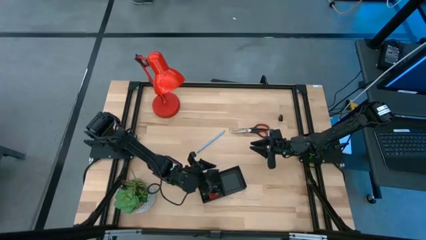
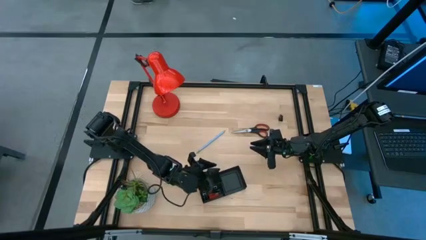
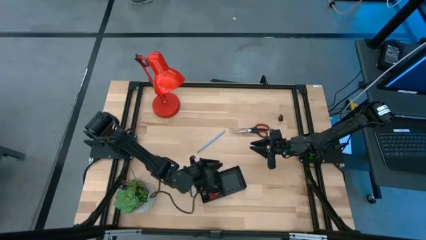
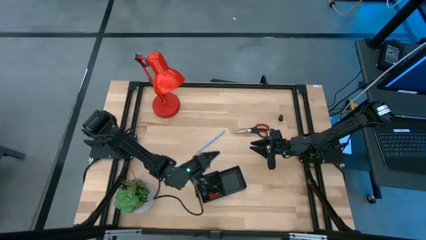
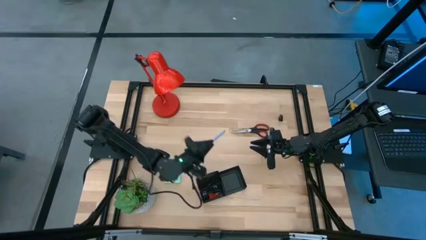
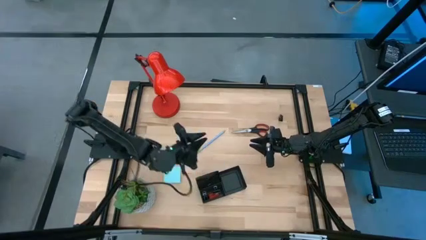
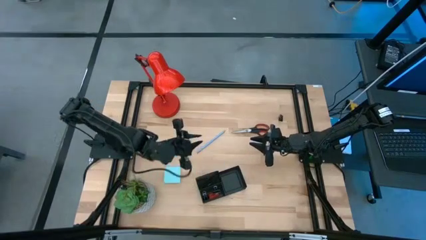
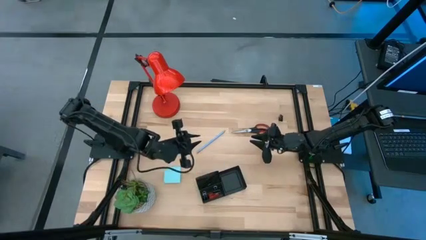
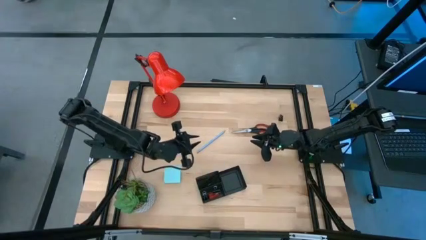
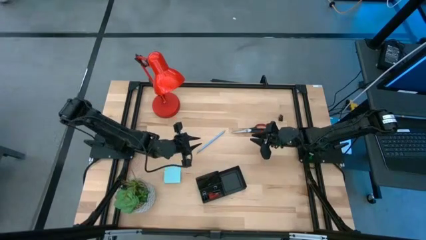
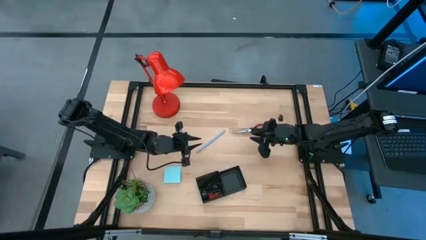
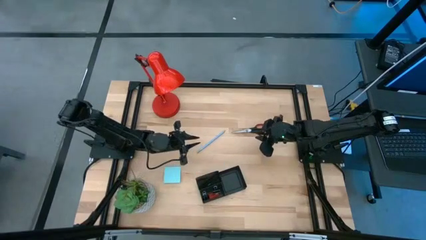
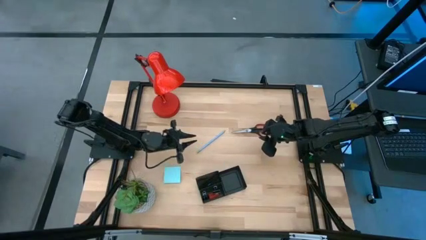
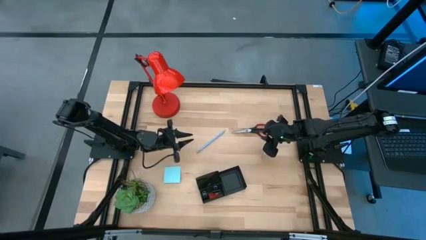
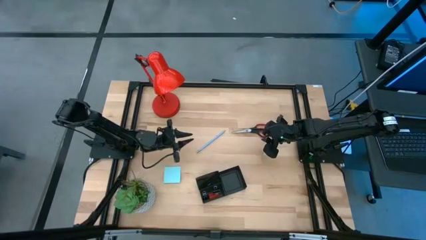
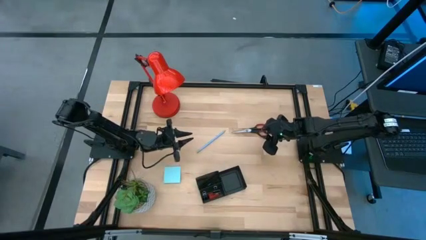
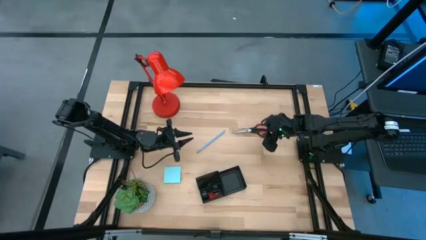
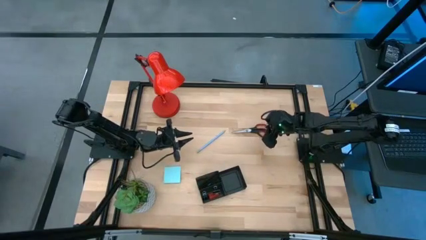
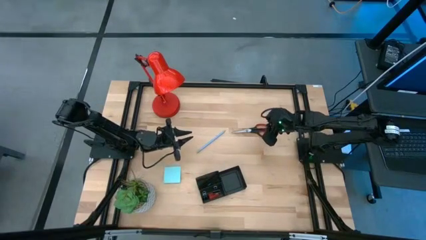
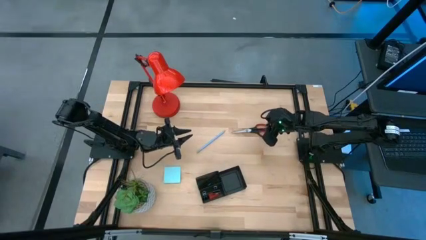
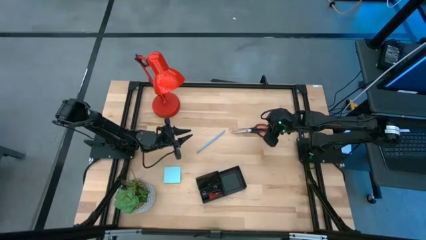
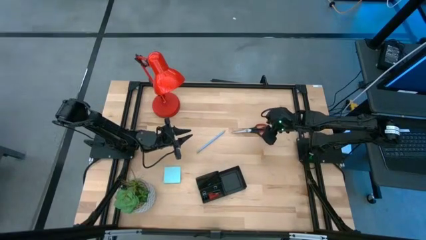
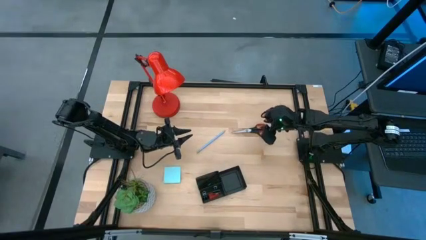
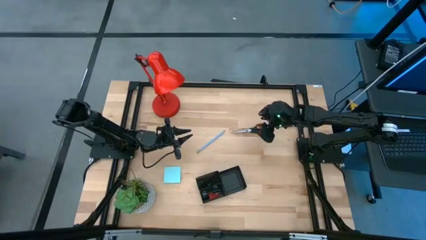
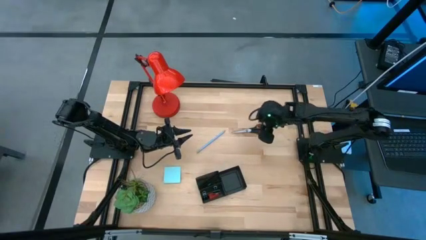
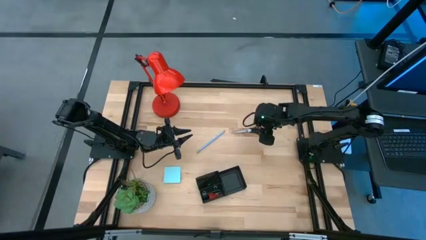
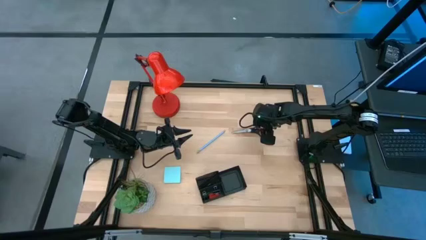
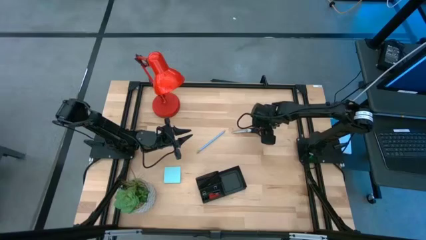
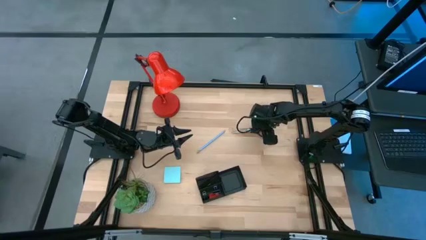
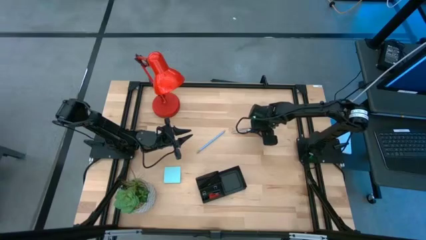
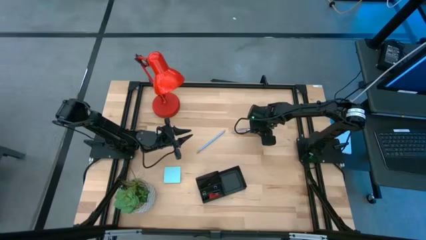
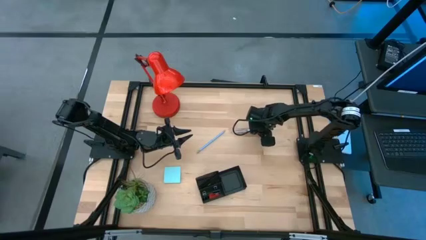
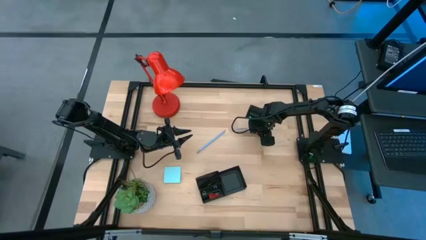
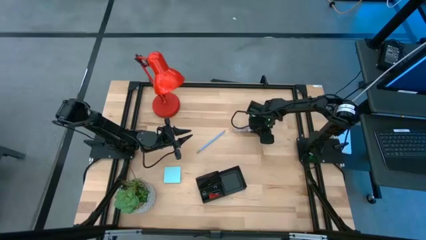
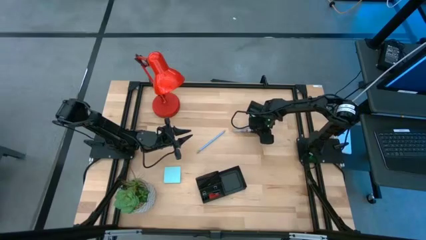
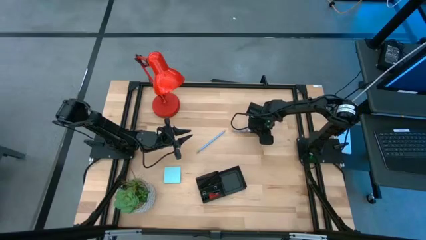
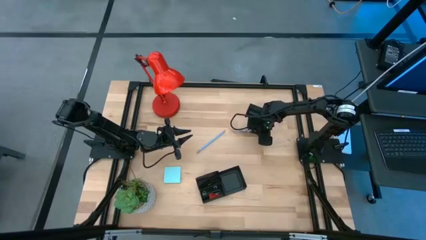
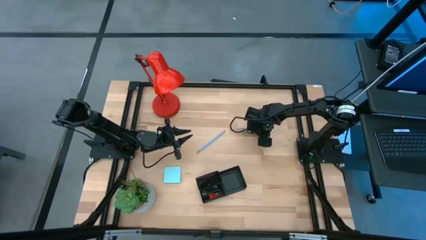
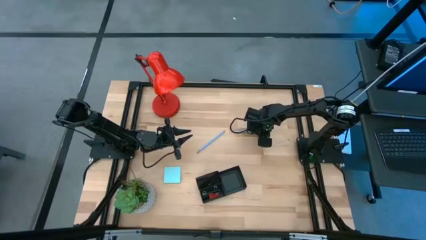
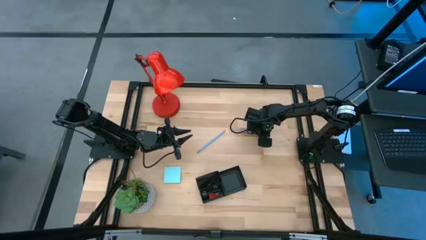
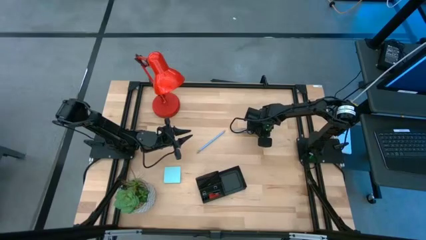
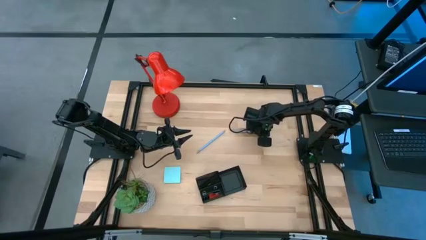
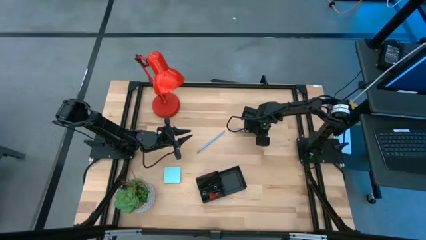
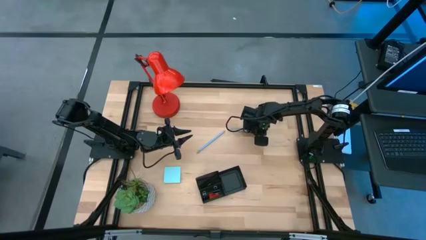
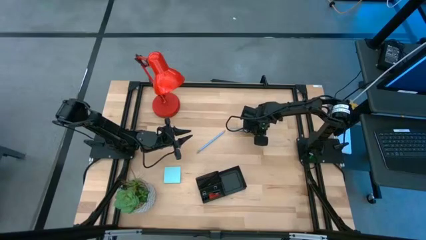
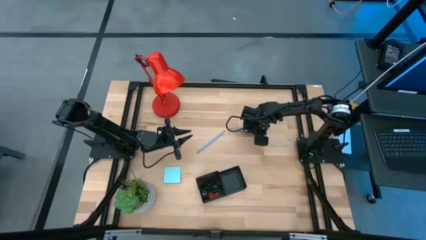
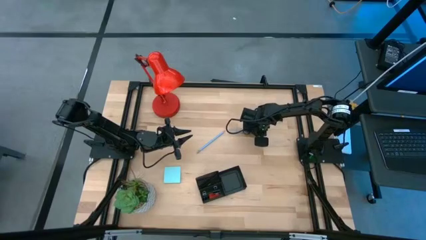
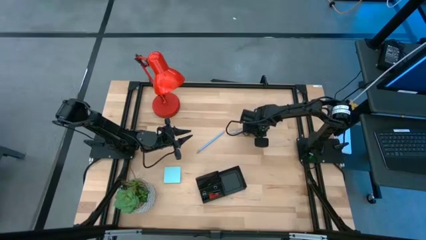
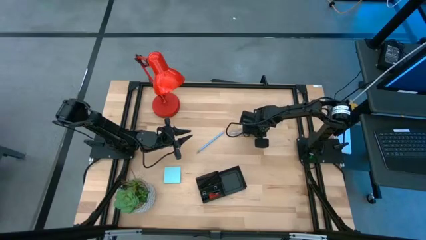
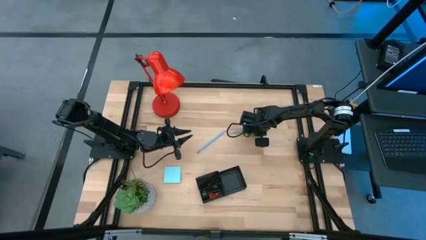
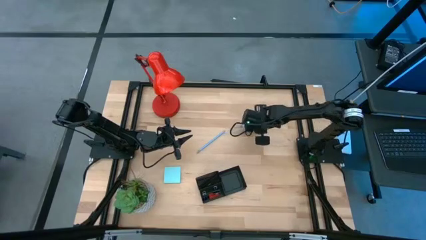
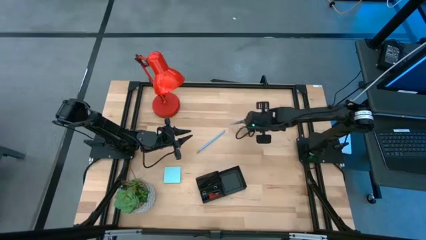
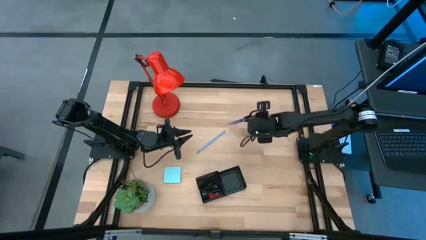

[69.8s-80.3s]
Task: Pick and place office supplies into organizer
Put the black scissors into the black desk organizer

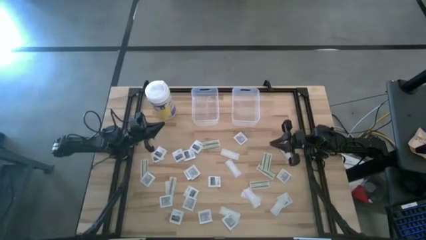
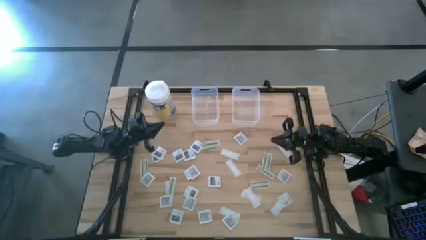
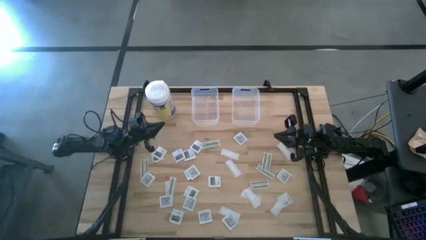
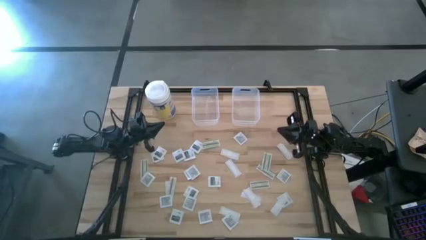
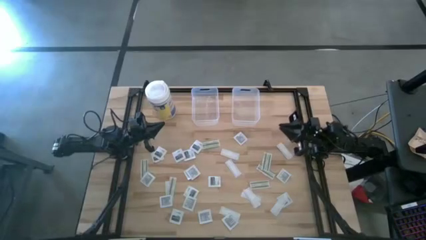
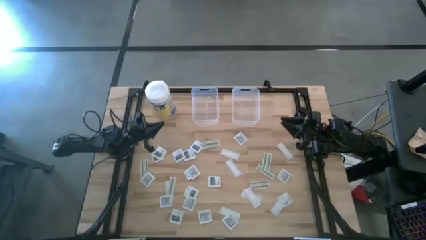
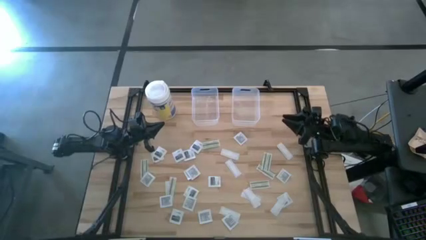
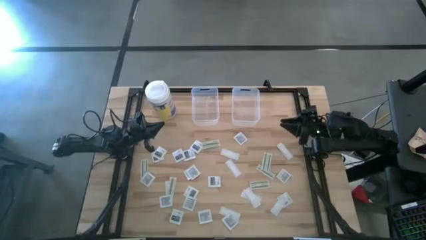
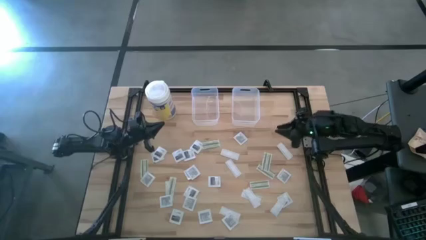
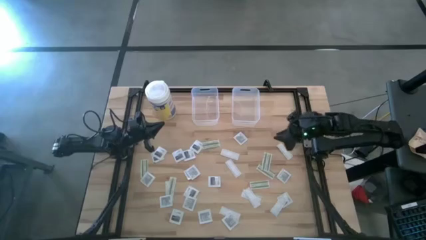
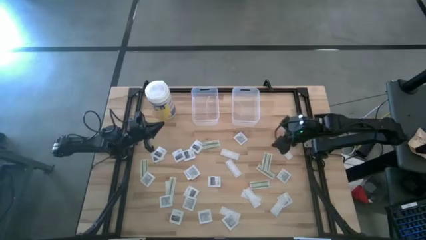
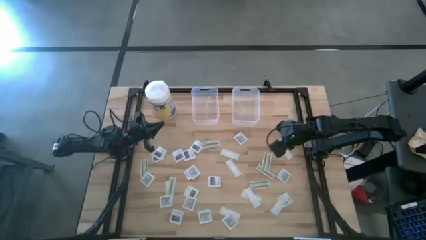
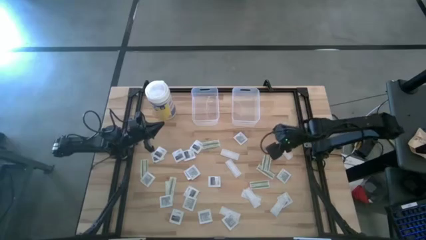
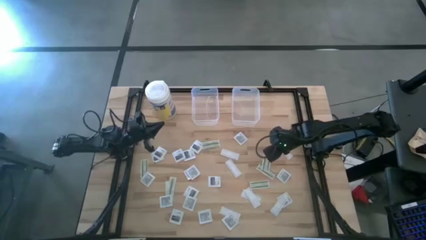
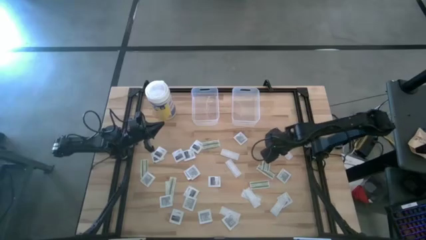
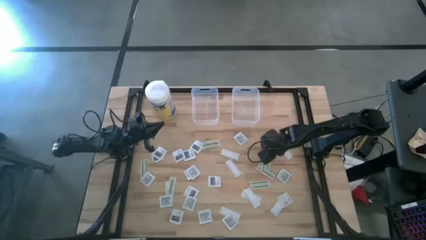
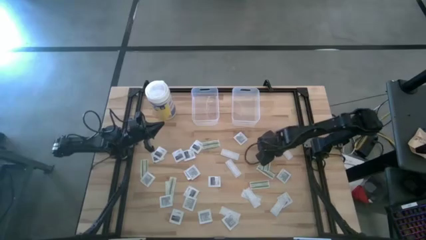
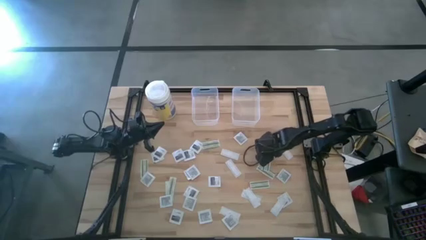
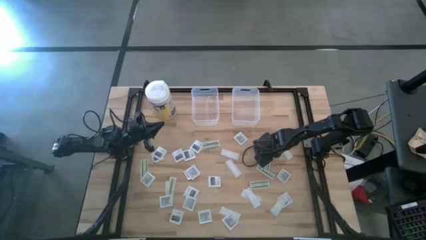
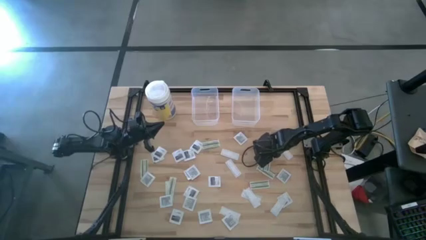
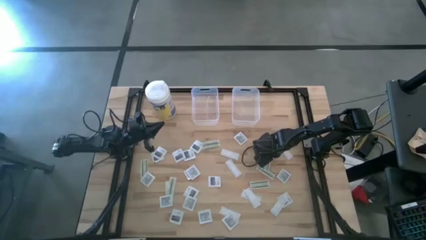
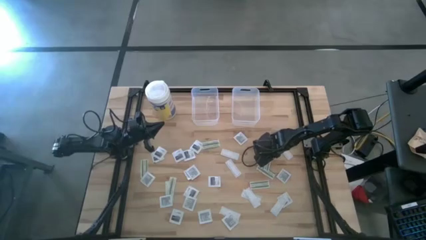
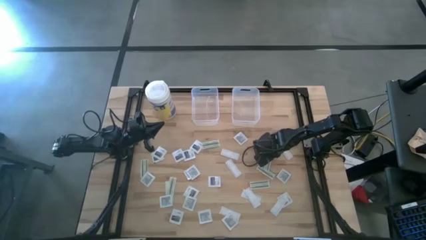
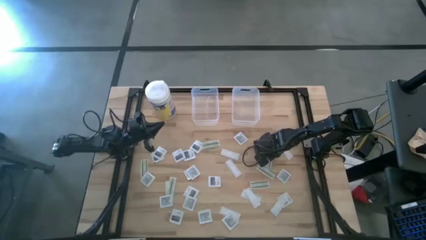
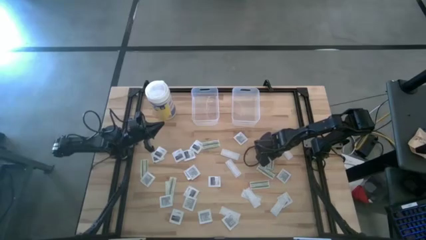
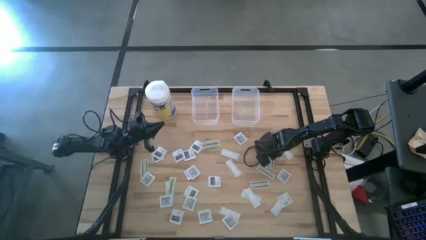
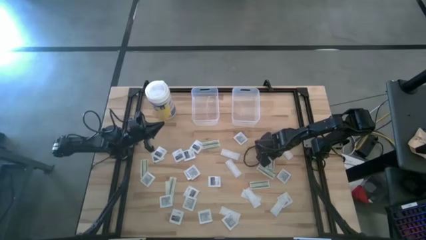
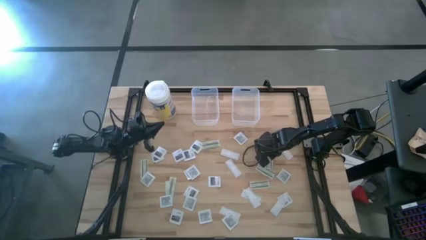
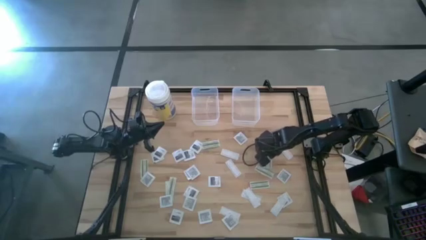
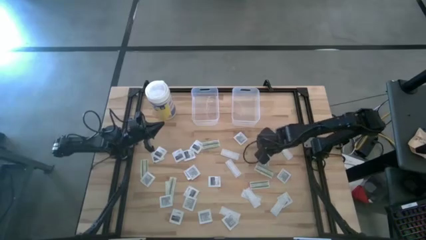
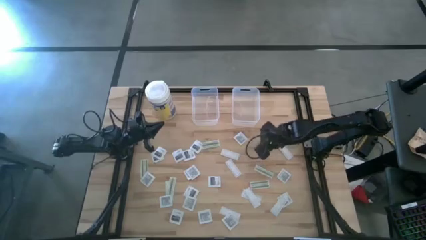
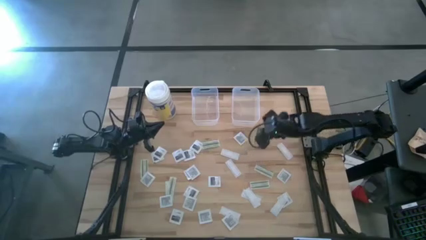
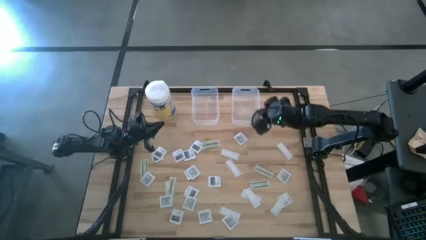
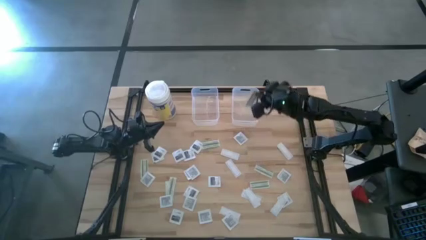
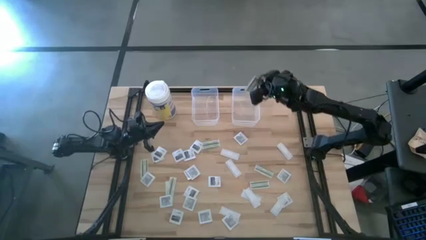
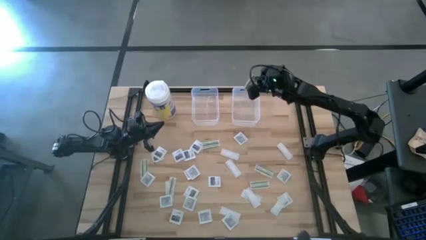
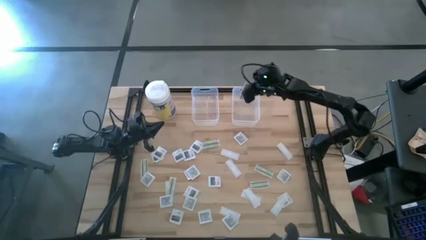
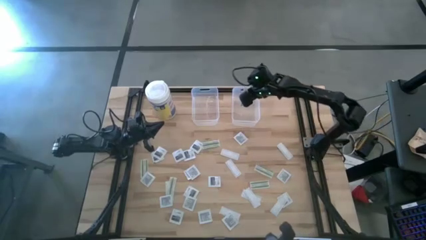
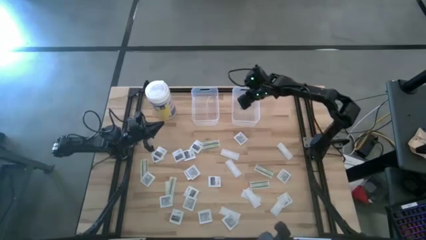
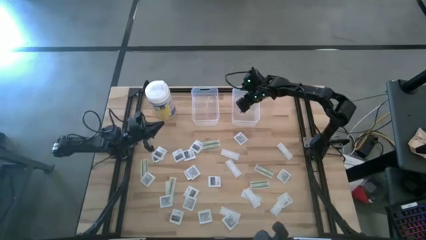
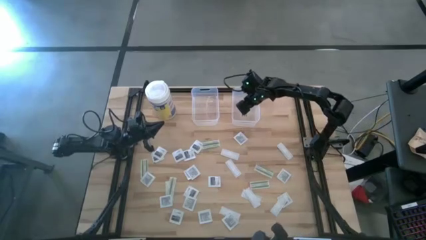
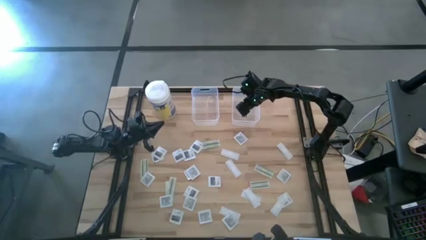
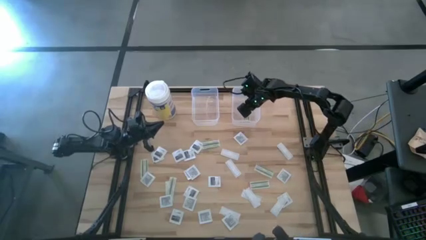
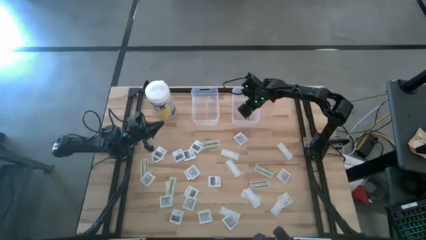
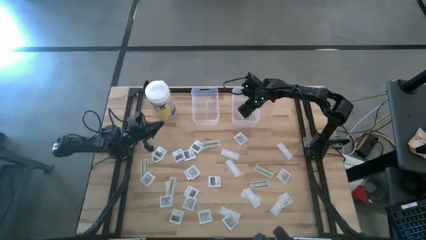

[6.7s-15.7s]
Task: Pick & Place First Aid Supplies
Put the bandage into the right transparent bin
